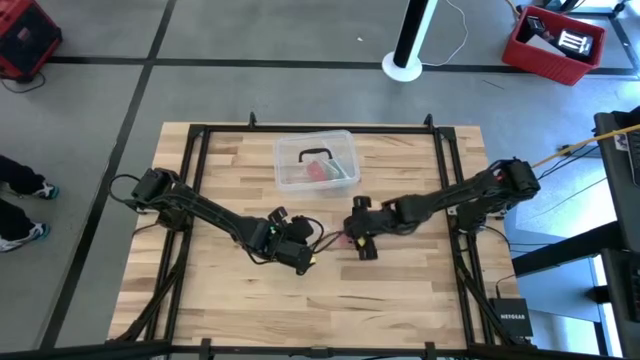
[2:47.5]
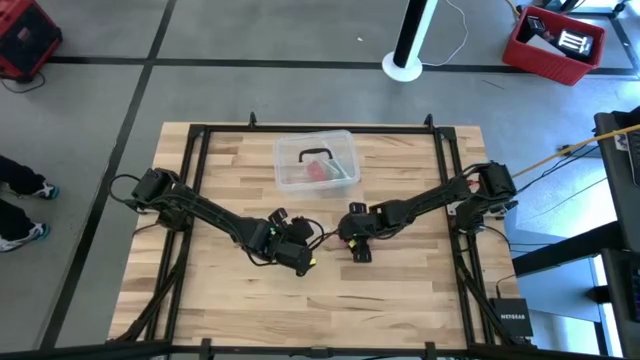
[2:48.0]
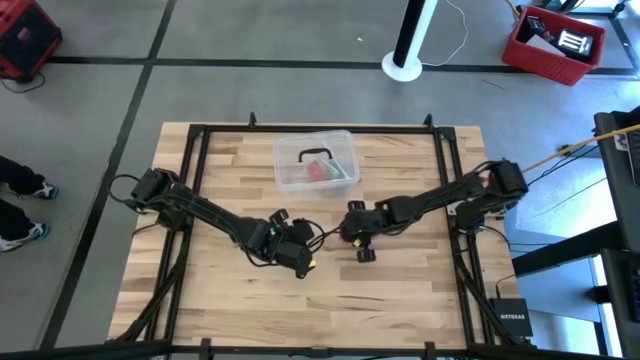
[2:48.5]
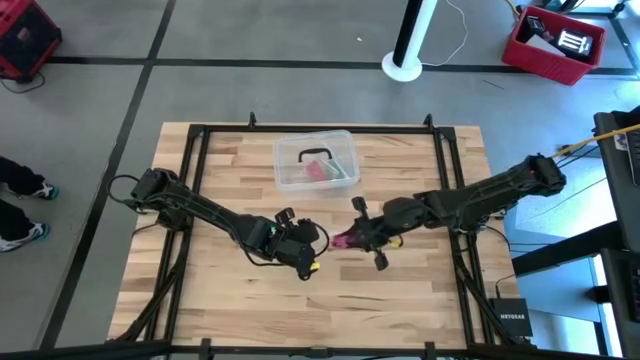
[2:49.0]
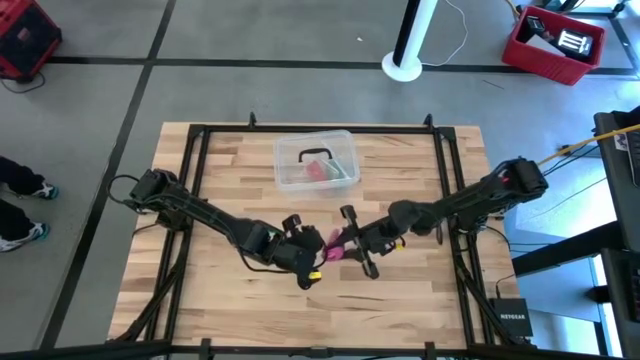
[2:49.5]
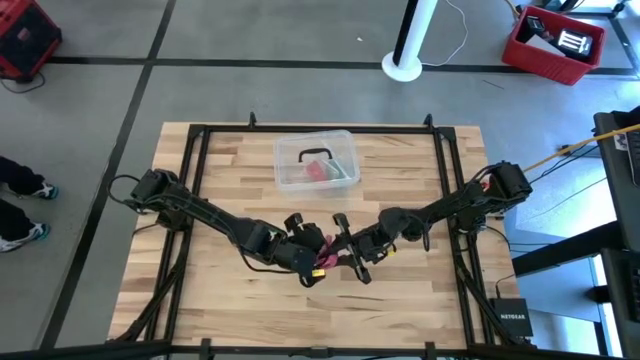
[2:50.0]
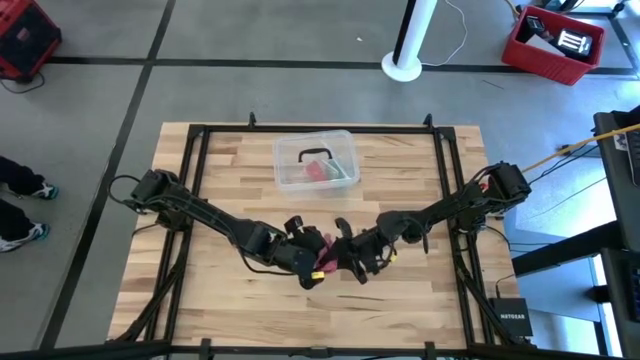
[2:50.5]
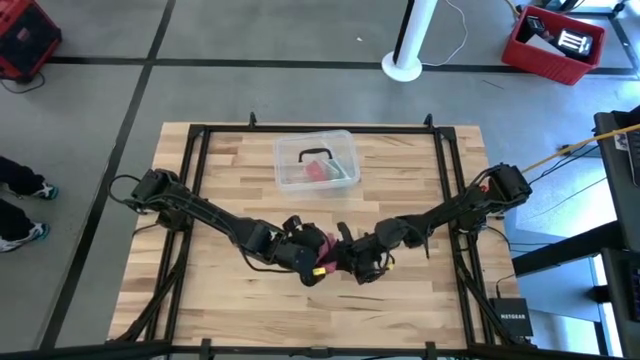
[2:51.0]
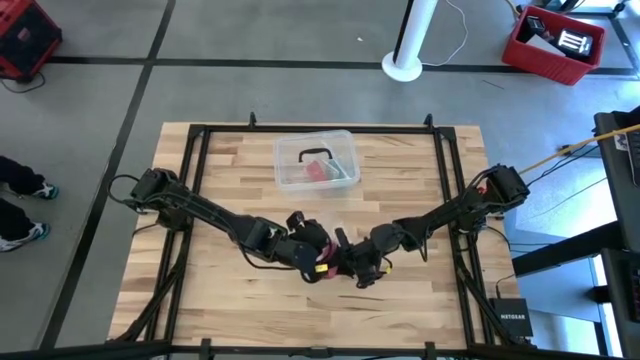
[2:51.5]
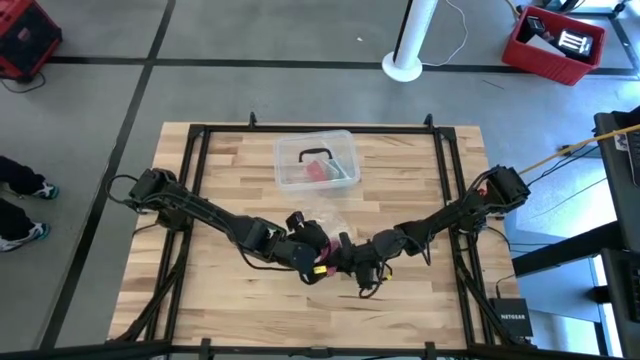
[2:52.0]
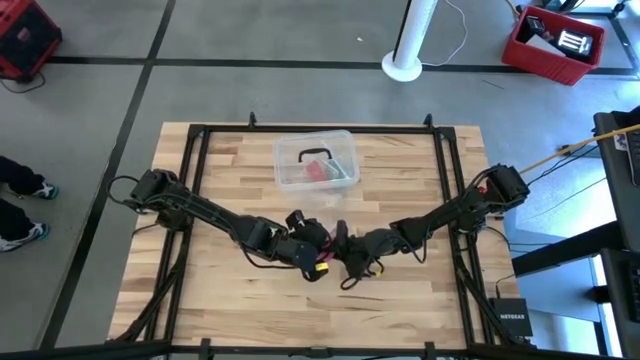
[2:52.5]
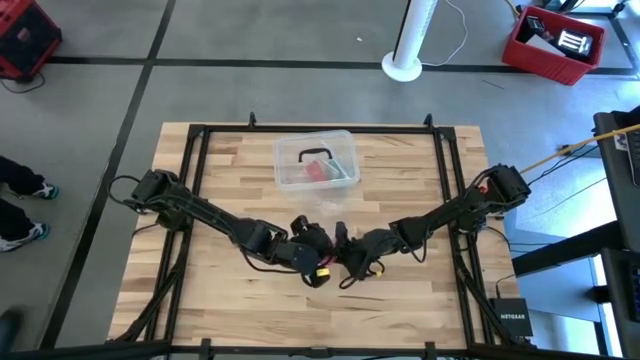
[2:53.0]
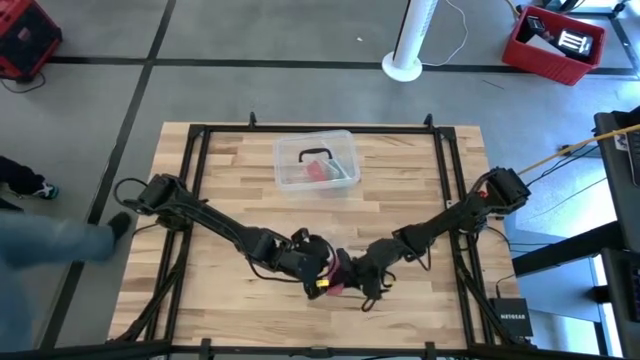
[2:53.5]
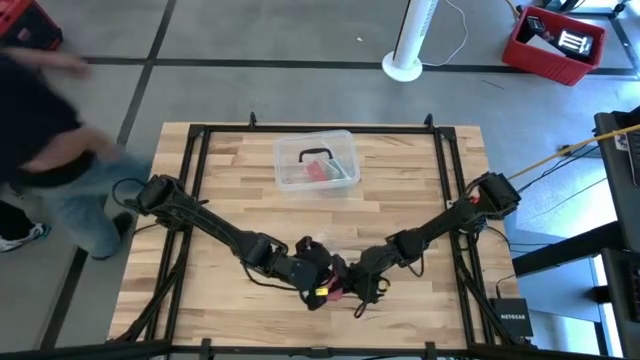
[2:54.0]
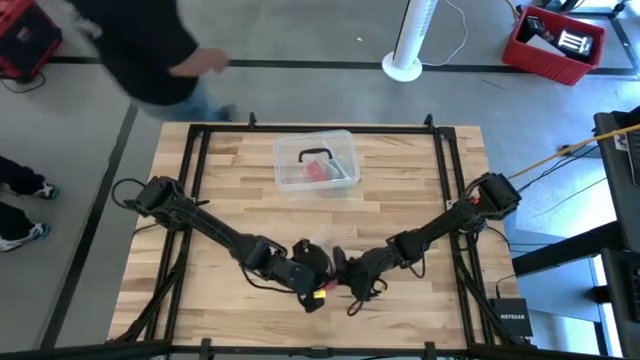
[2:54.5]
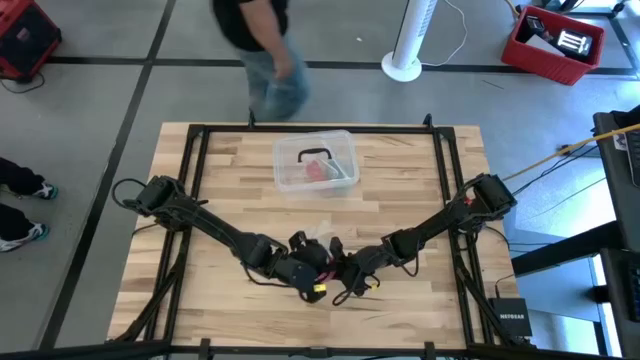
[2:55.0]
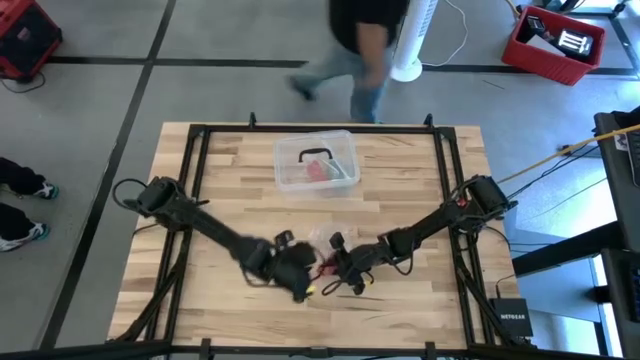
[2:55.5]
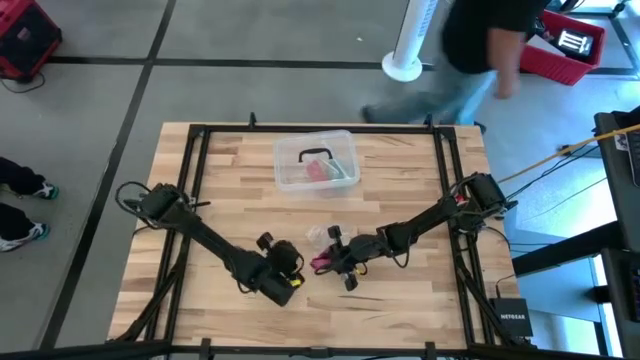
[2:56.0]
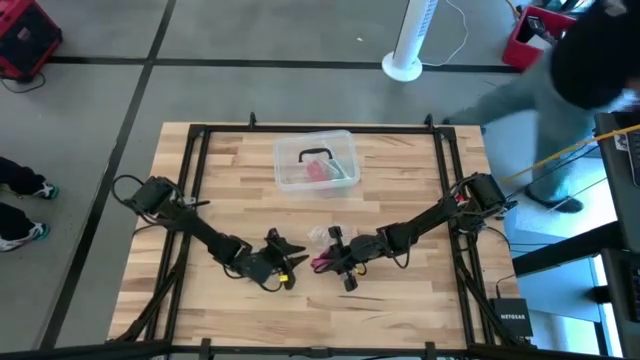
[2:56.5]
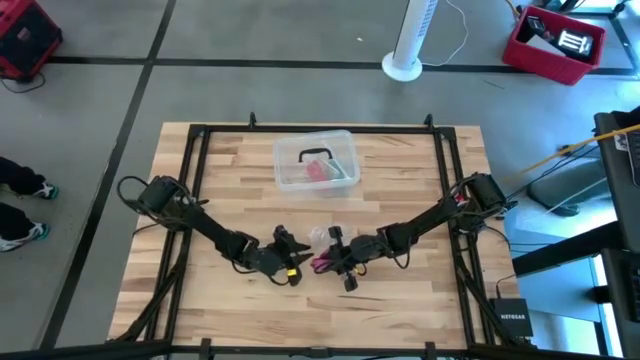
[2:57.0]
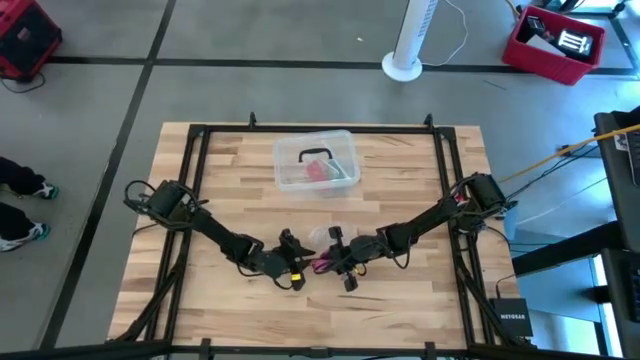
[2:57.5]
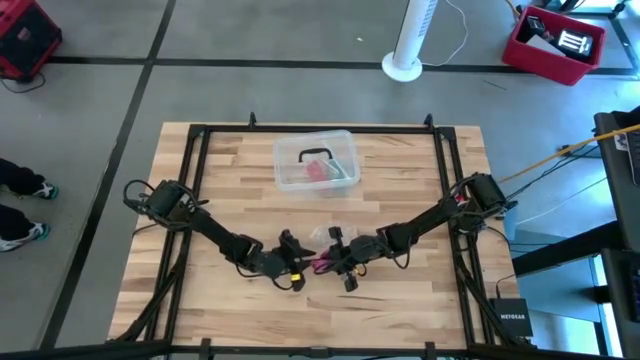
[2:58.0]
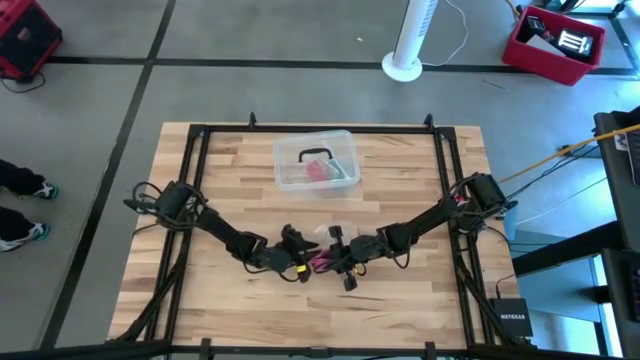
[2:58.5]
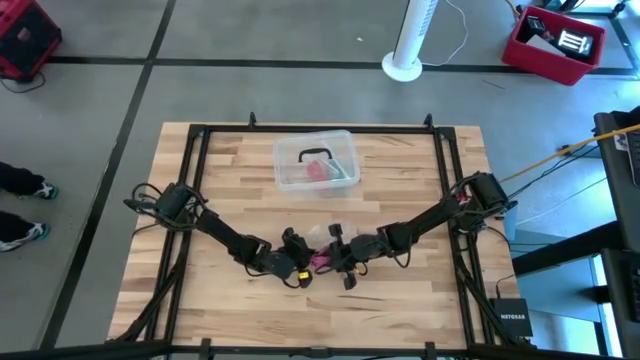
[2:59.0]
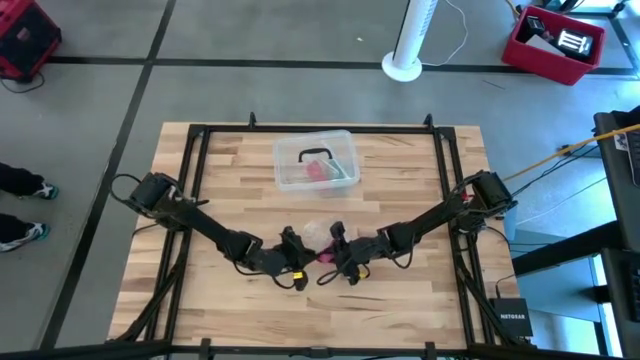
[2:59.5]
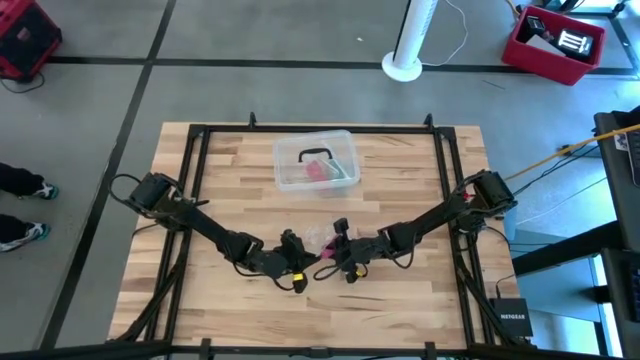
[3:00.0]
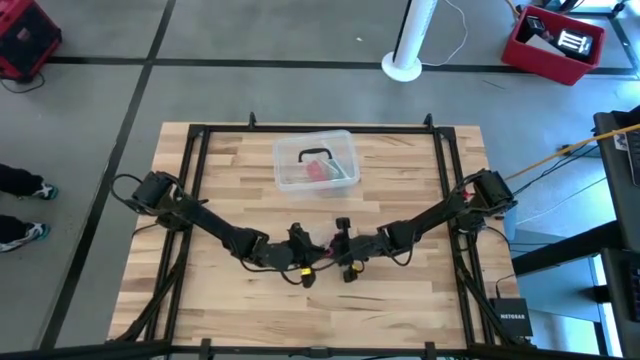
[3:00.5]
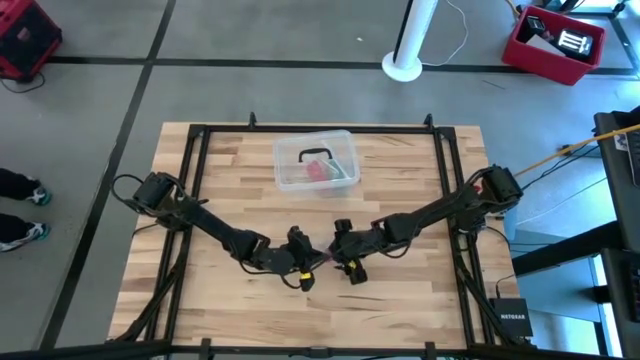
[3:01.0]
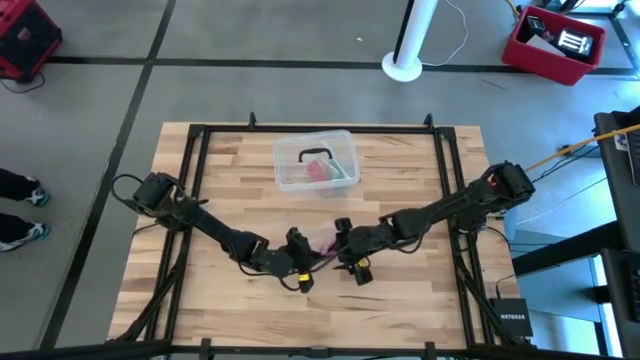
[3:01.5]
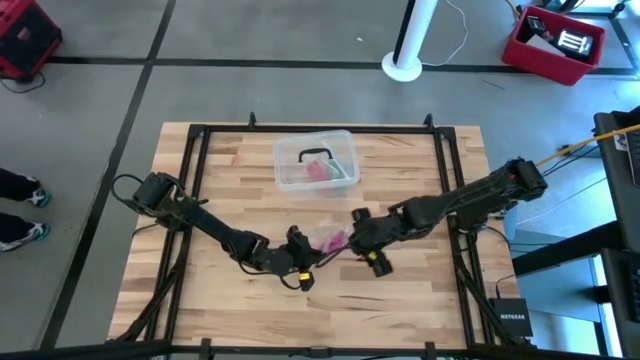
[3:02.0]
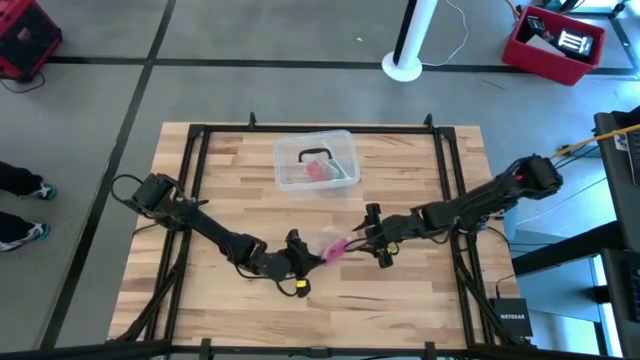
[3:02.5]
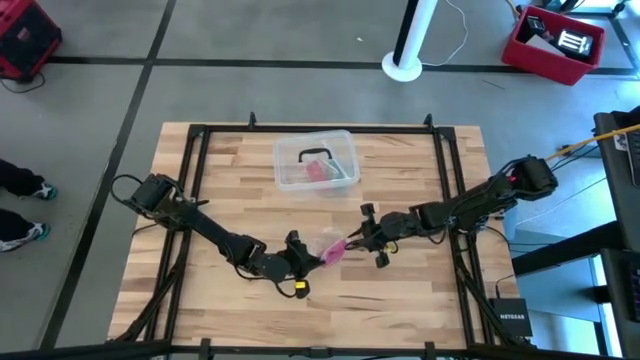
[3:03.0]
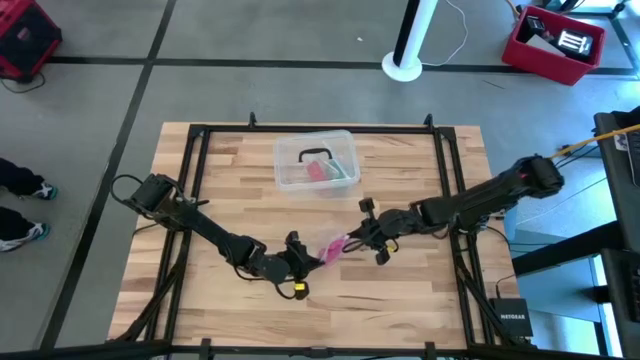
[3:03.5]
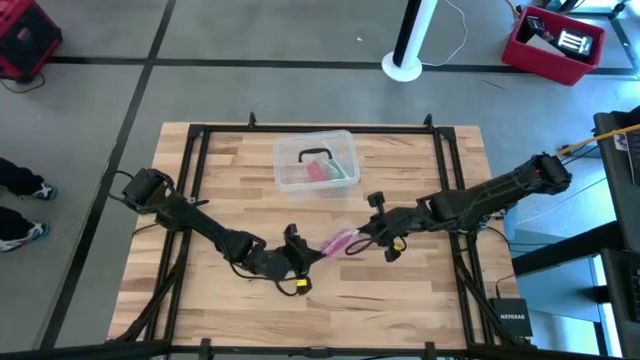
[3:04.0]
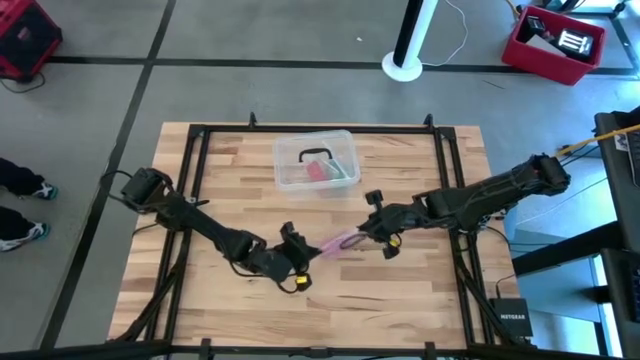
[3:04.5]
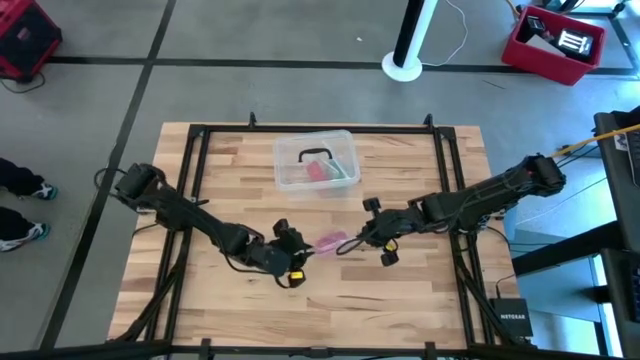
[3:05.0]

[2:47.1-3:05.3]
Task: Roll bandage
Put the rolled pink bandage into the transparent zip bag

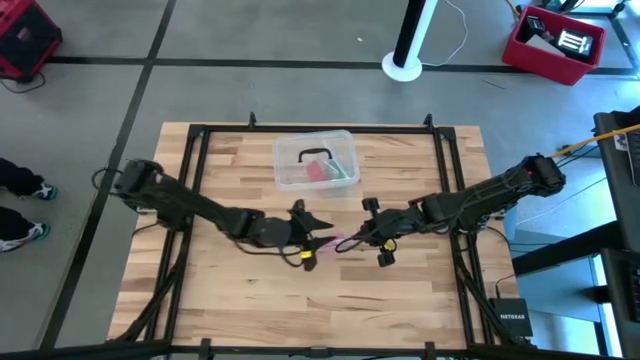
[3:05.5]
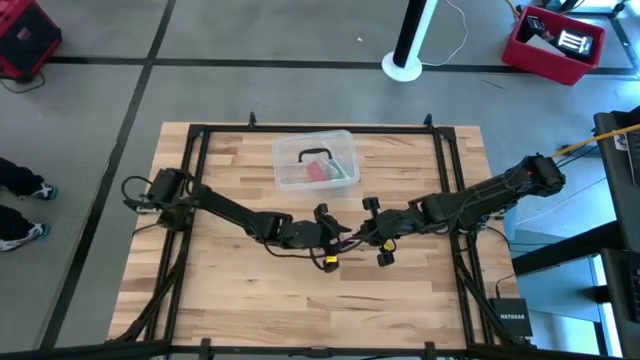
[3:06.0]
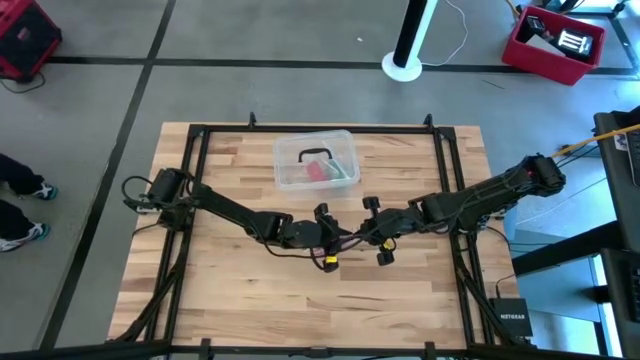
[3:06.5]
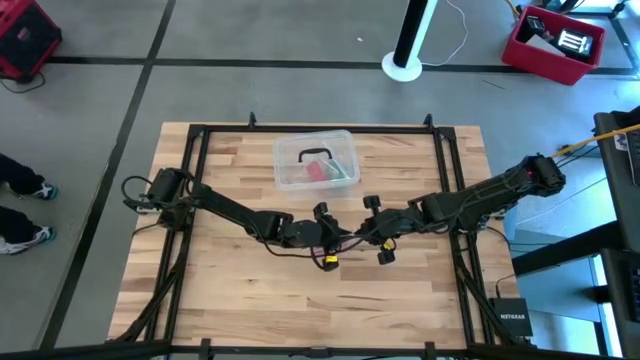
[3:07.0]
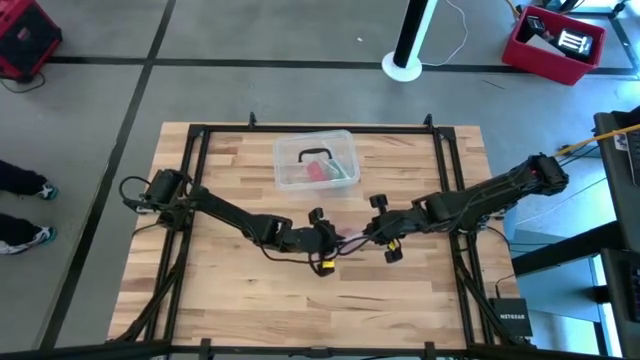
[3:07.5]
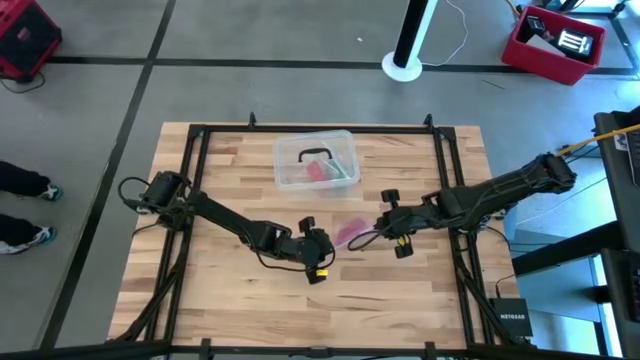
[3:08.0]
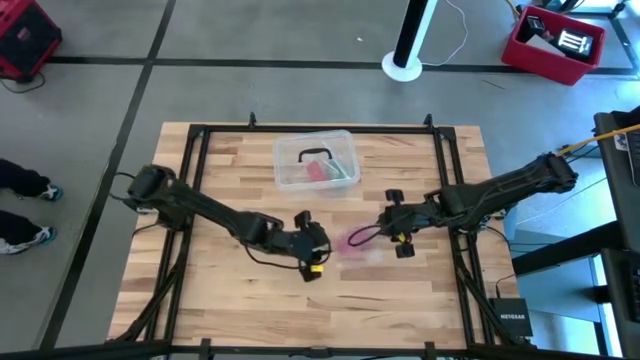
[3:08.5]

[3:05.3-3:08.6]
Close the transparent zip bag

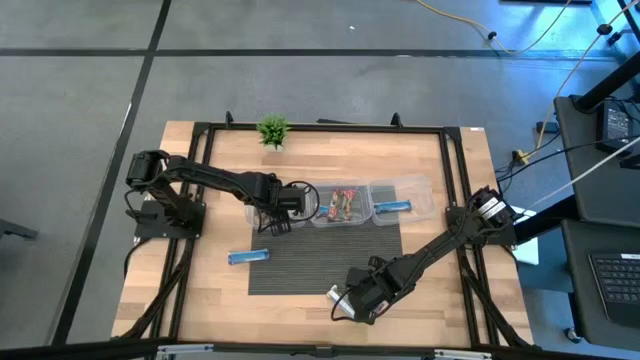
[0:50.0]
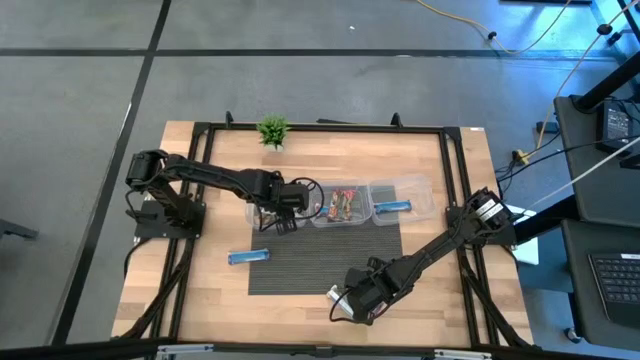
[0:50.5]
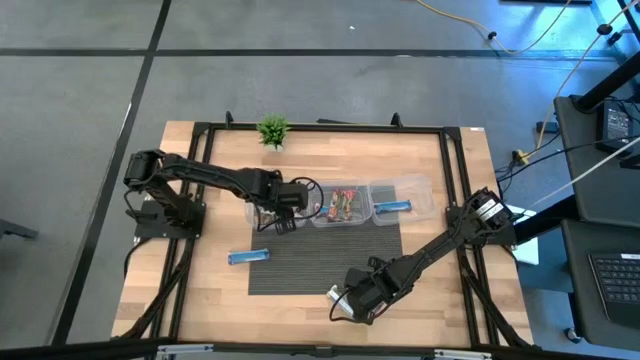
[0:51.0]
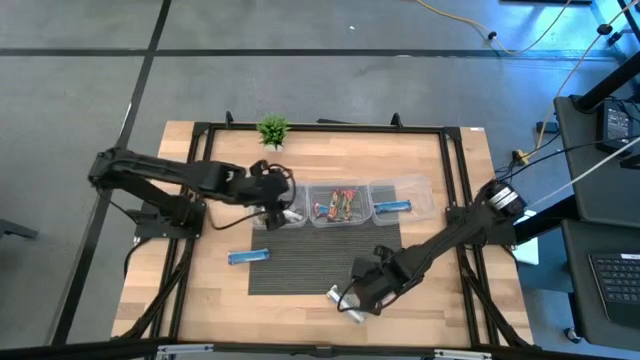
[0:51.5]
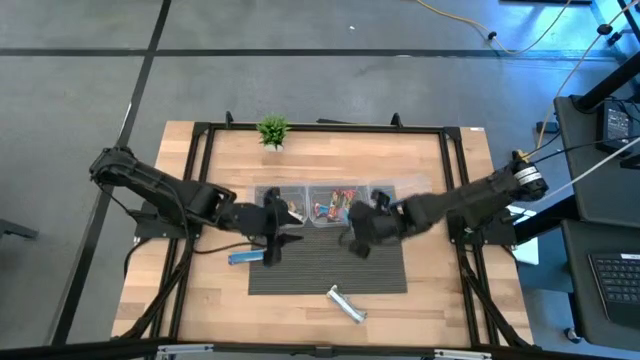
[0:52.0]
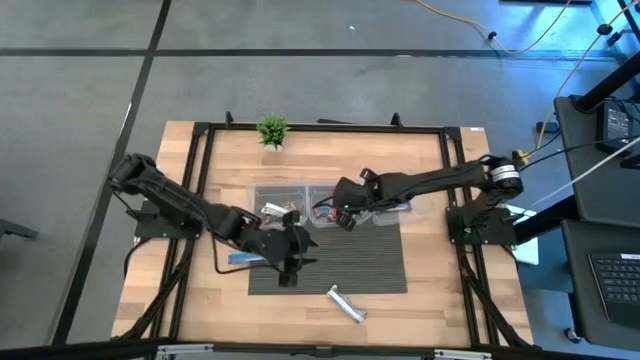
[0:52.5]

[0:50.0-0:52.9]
Task: Pick and place Granola Bars by type
Put the red granola bar into the center transparent bin
